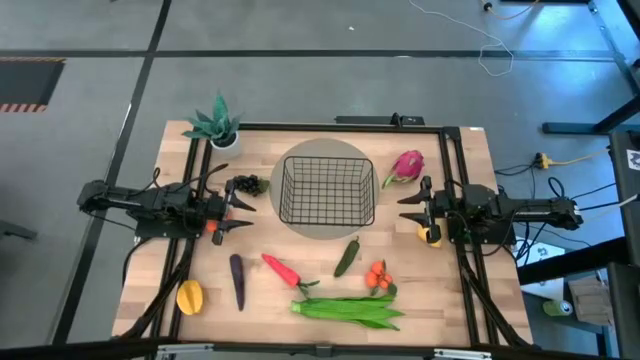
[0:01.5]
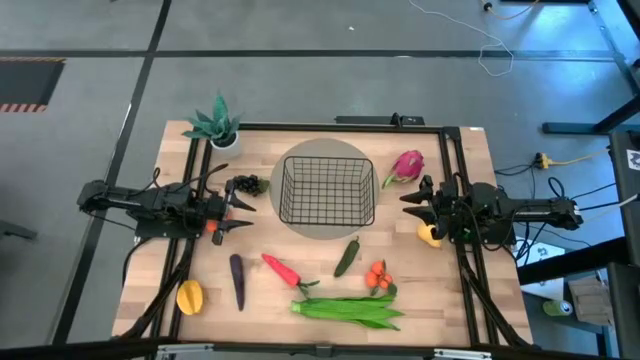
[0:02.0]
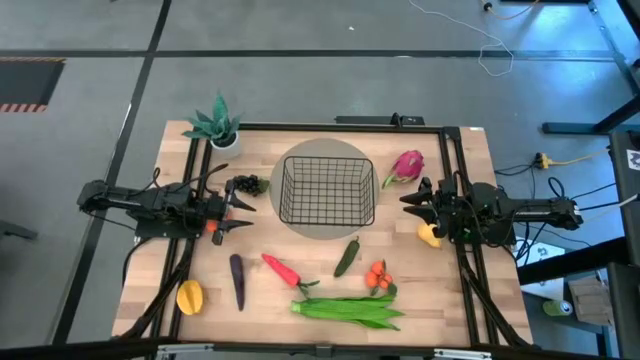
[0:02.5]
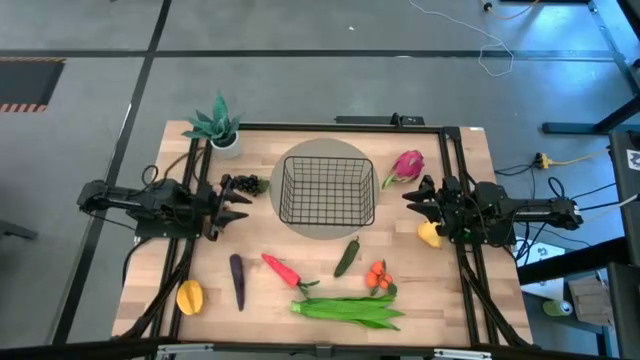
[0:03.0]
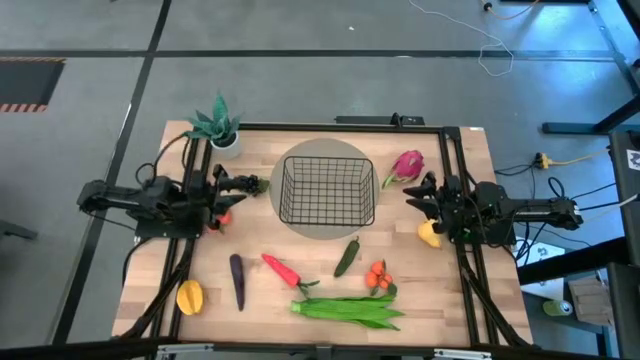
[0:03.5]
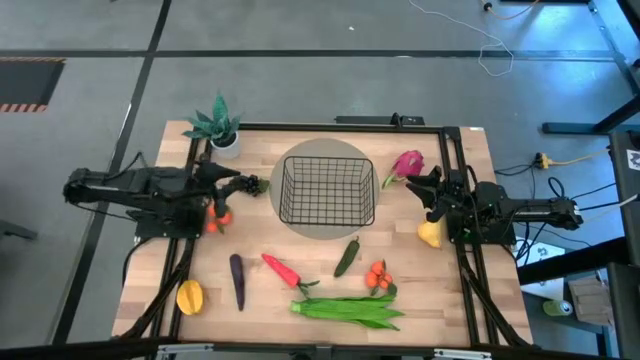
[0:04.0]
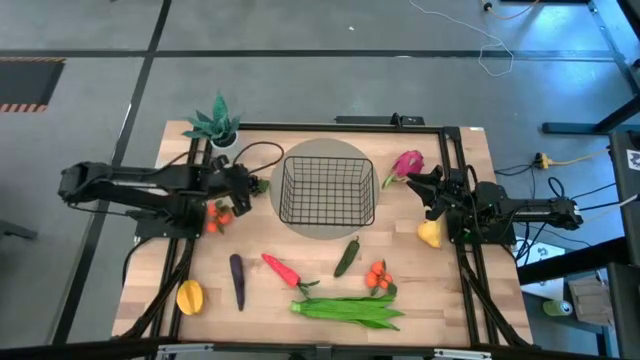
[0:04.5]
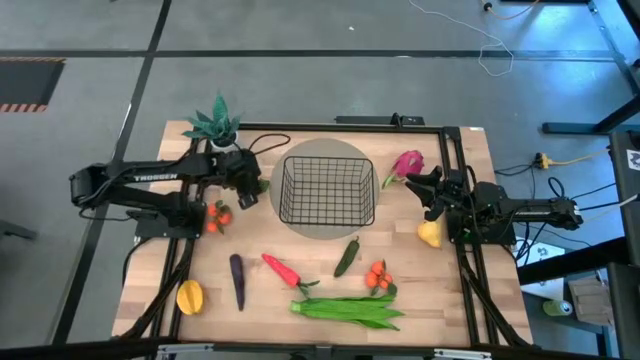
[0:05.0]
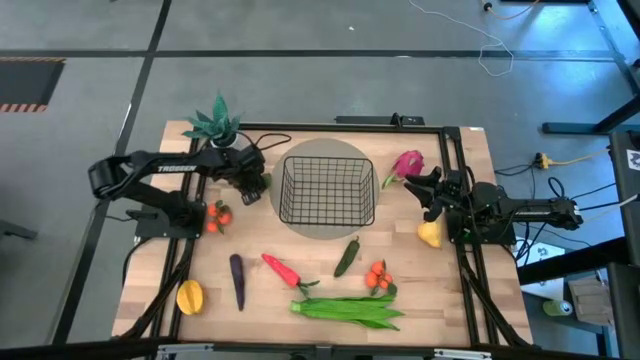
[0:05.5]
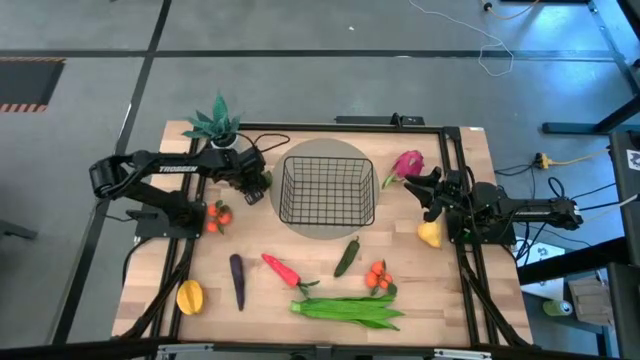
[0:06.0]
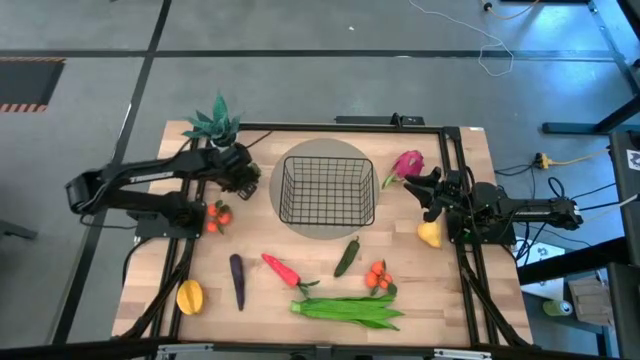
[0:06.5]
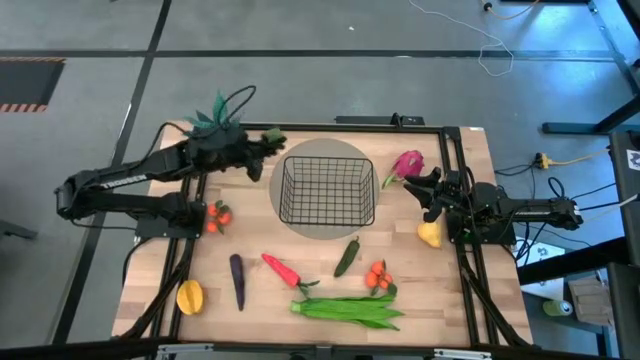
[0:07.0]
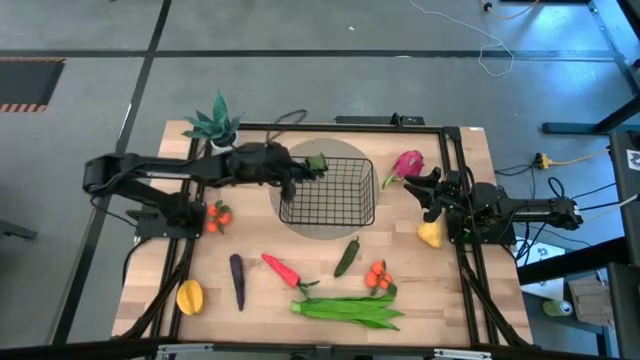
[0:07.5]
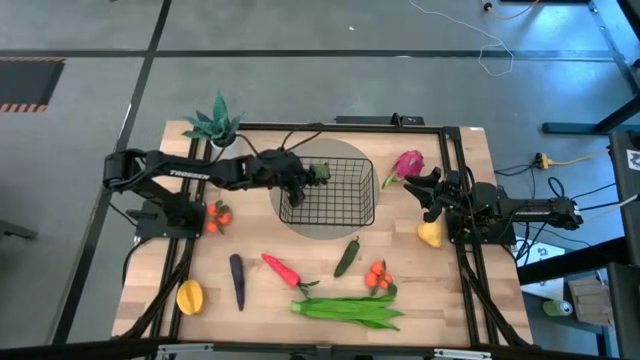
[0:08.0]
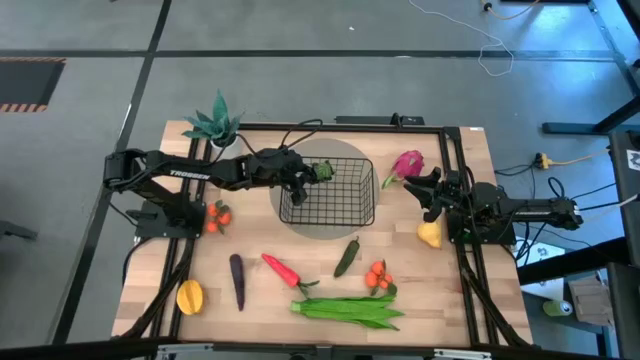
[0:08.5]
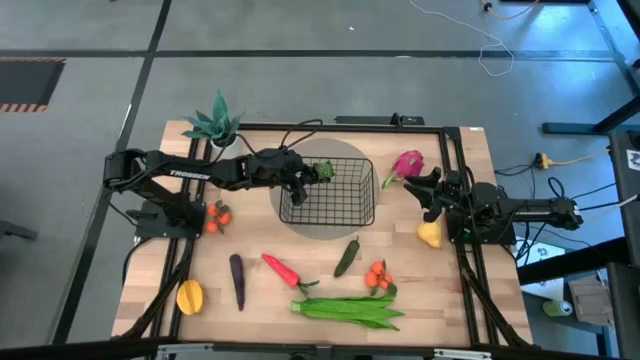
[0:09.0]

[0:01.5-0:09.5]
Task: Build produce basket
Put the grapes into the black wire basket

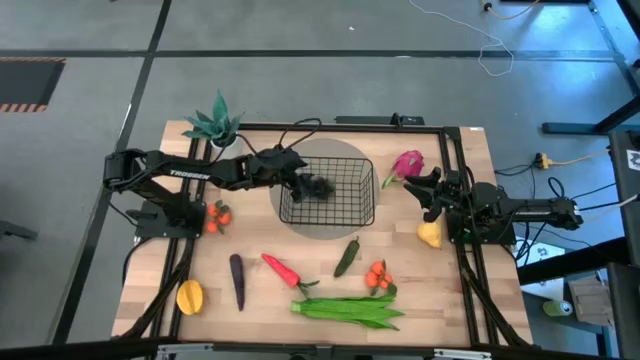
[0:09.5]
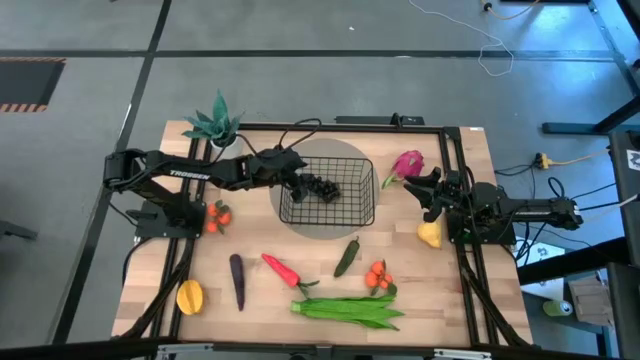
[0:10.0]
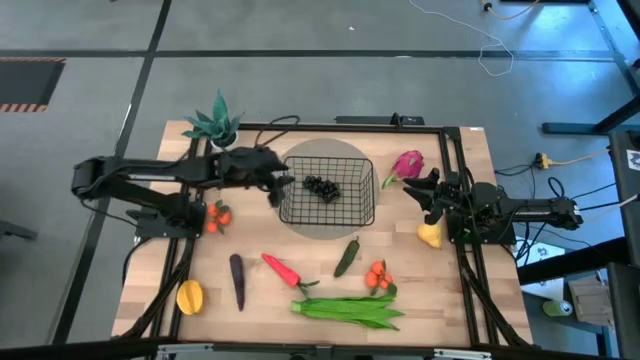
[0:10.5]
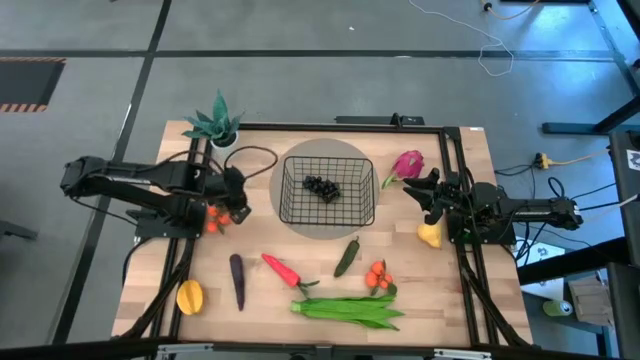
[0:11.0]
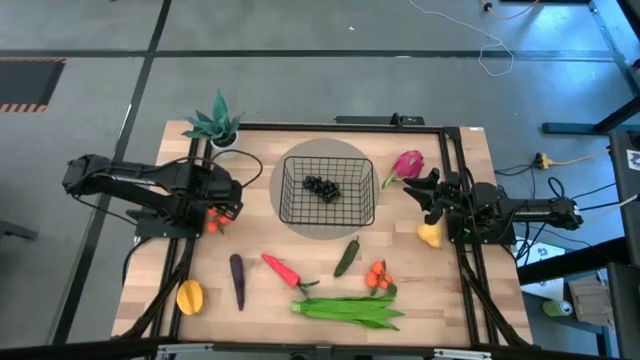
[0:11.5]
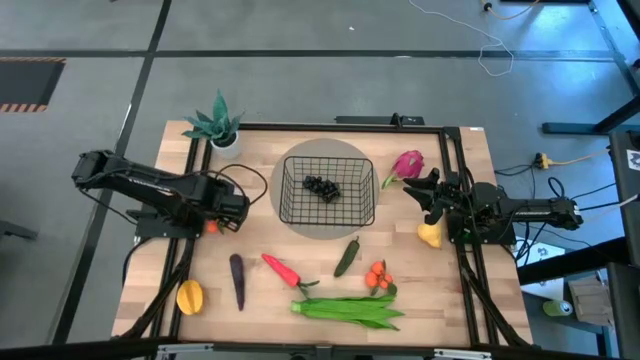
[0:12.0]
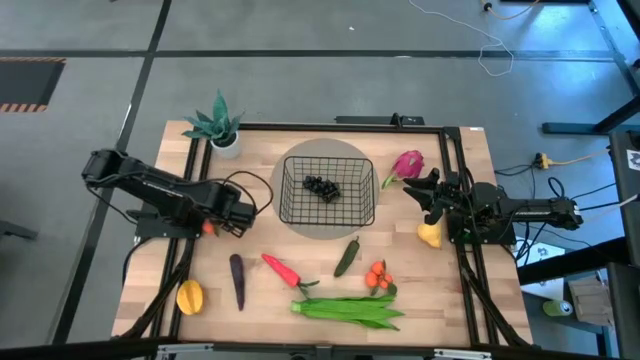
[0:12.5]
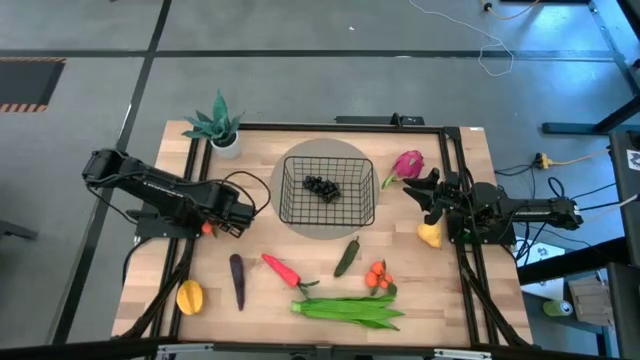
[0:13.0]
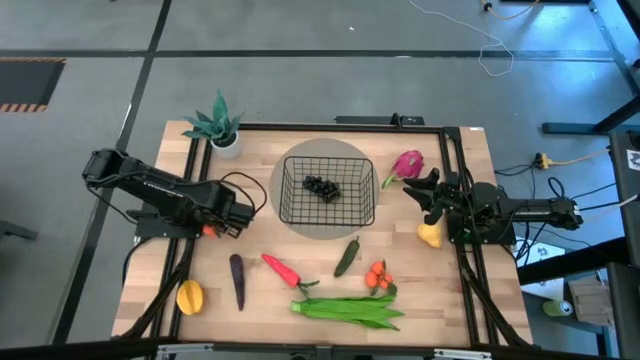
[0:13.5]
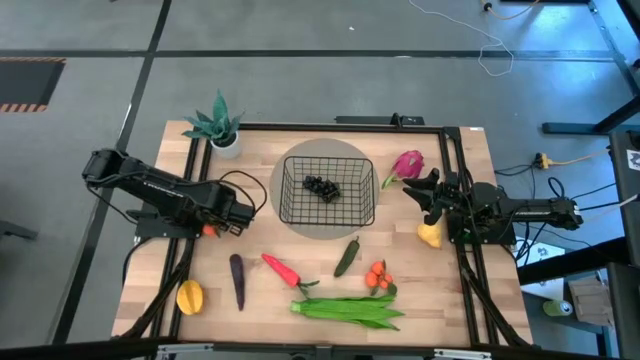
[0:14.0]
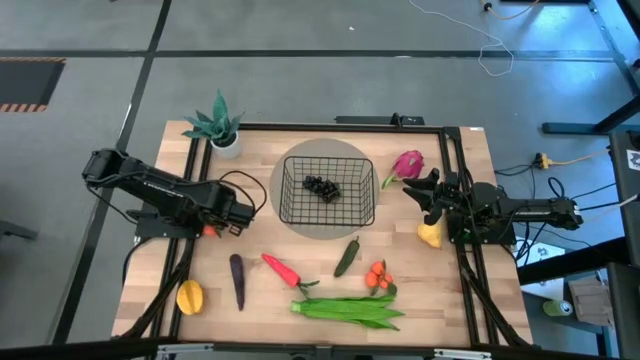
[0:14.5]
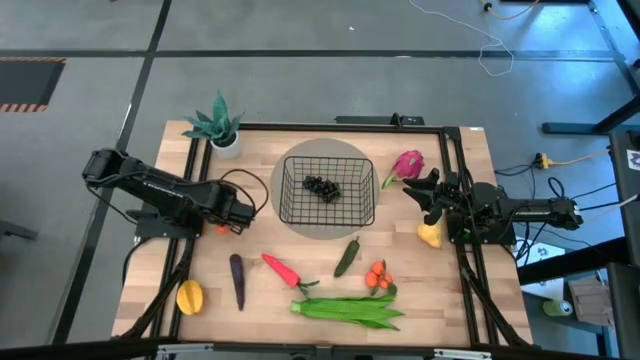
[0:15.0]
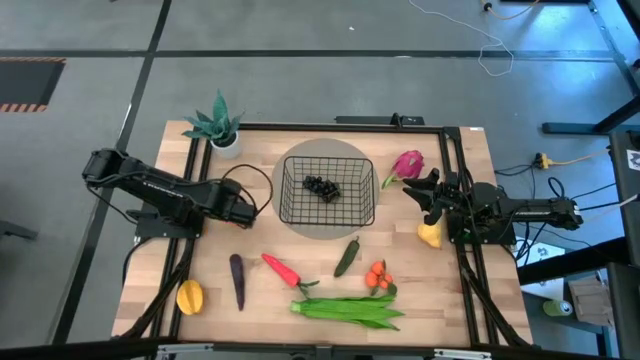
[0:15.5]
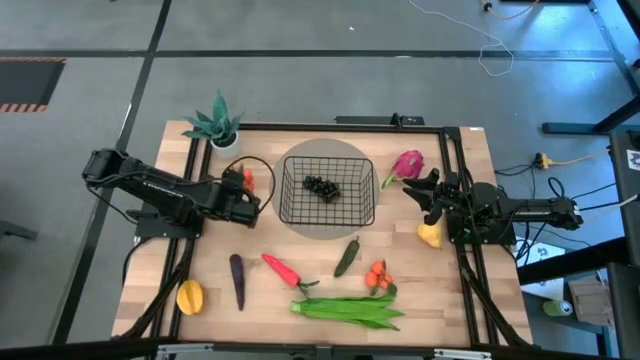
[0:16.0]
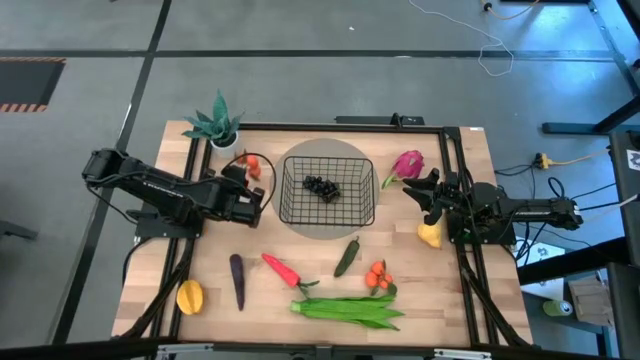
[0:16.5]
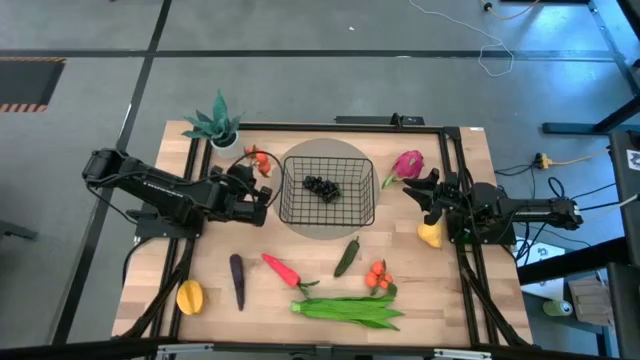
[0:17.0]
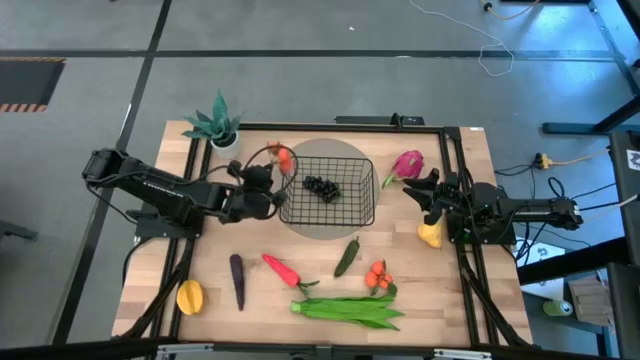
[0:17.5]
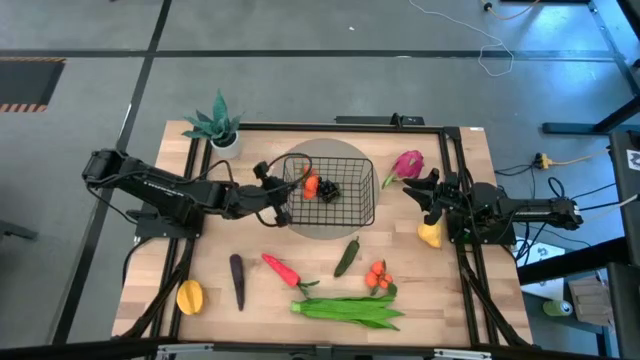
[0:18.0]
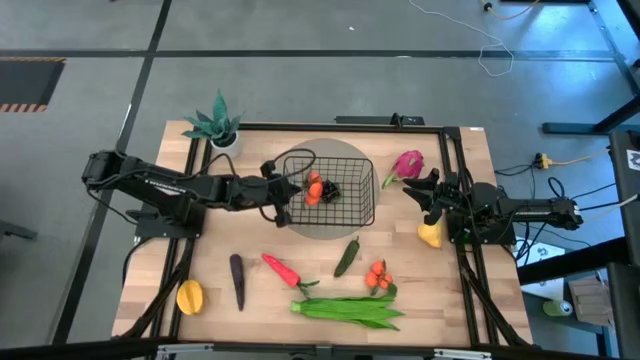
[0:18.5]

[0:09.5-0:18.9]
Put the left oranges into the black wire basket

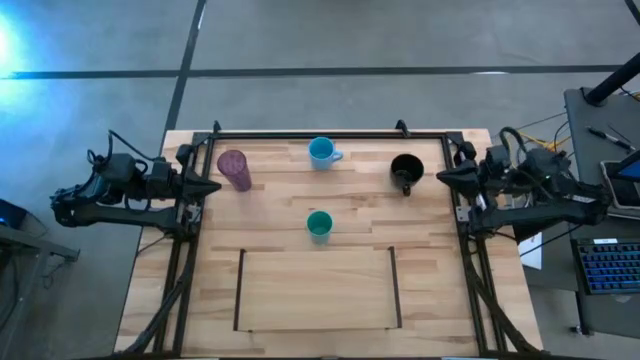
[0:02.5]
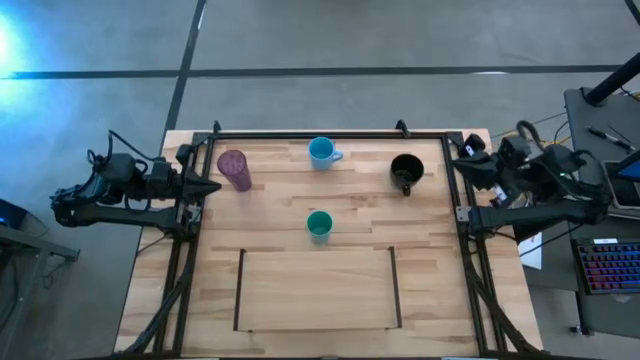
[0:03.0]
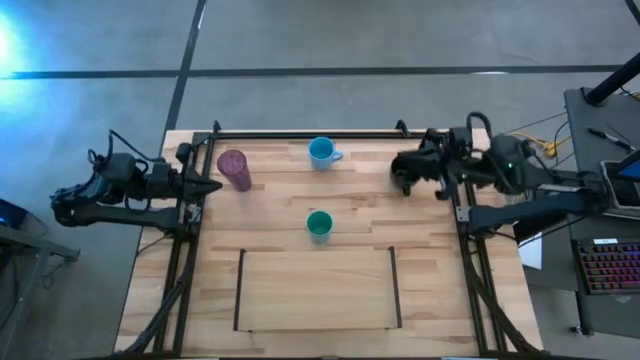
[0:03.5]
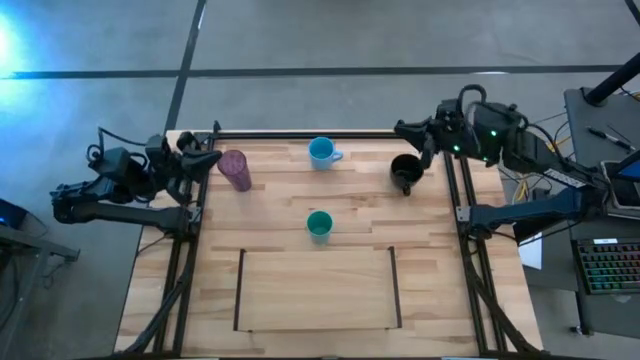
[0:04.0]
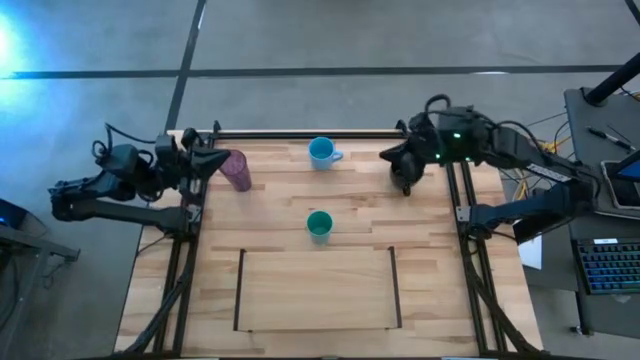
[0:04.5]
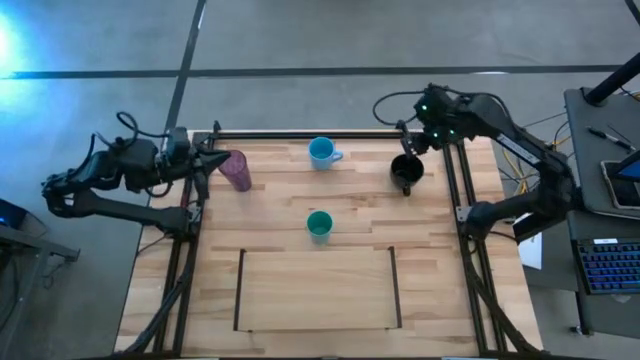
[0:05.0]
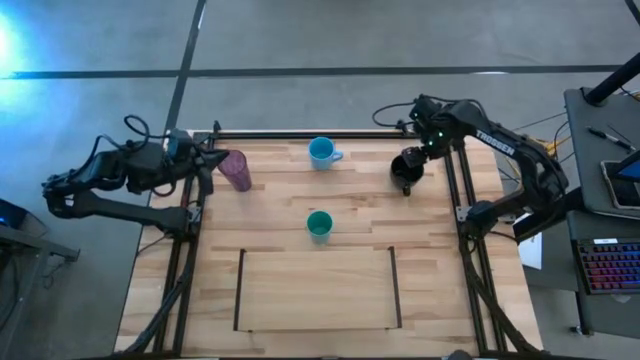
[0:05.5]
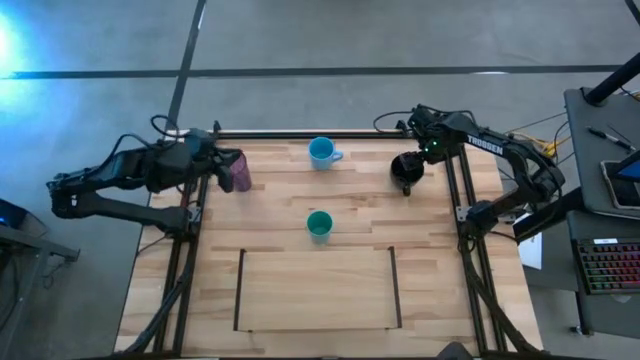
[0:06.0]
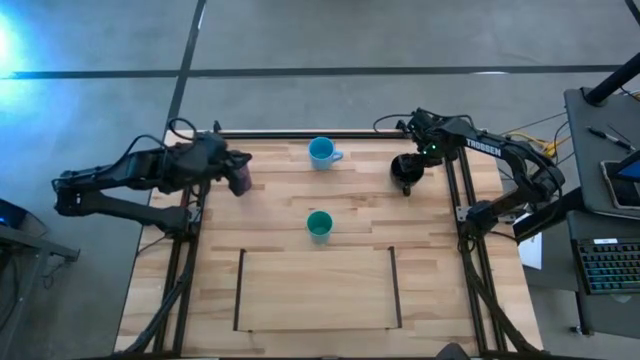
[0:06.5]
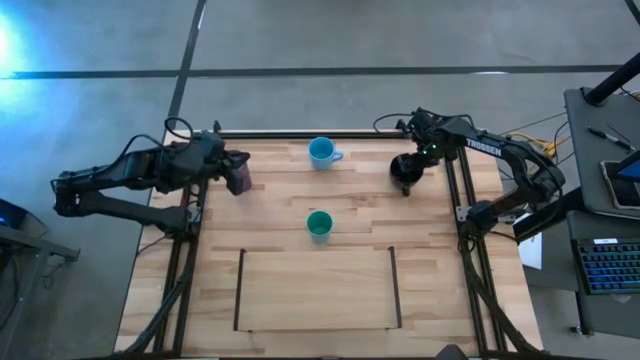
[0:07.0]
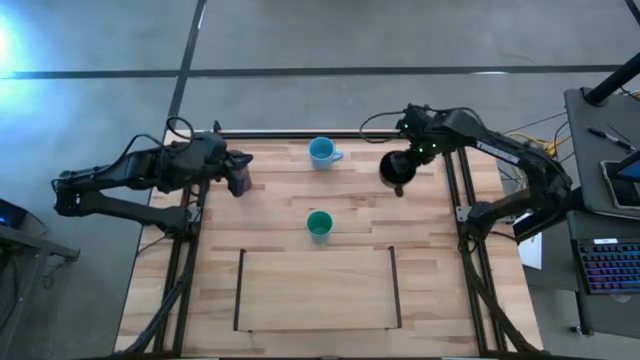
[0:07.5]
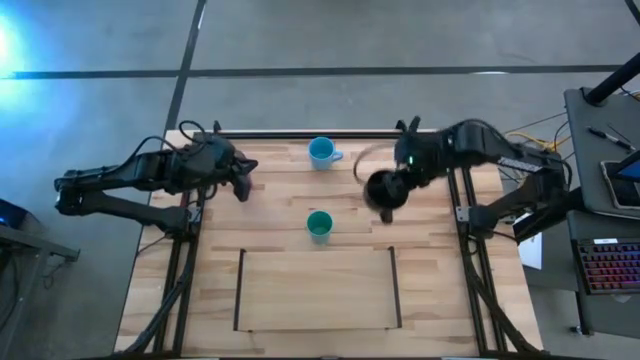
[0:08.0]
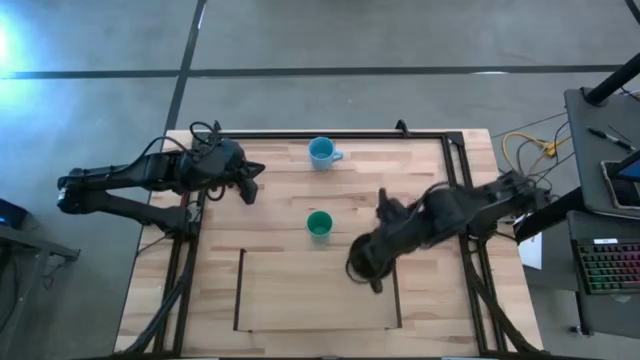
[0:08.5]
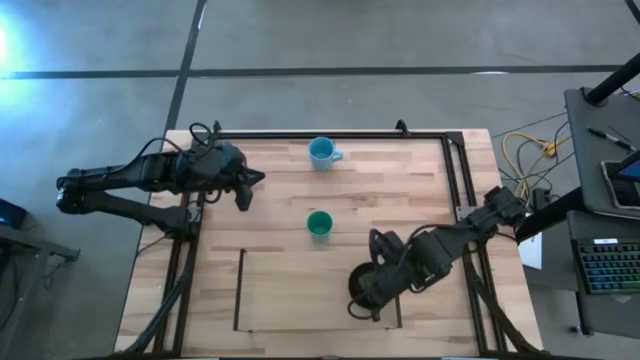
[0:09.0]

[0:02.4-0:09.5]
Task: Stack small to large cups/mugs on shelf
Put the black mug on the shelf
